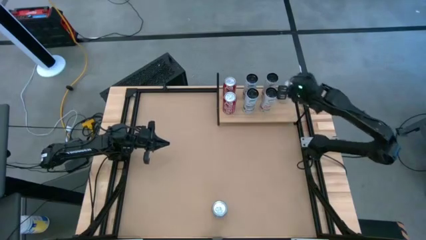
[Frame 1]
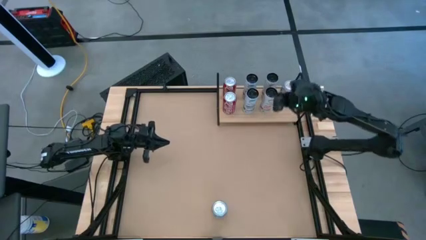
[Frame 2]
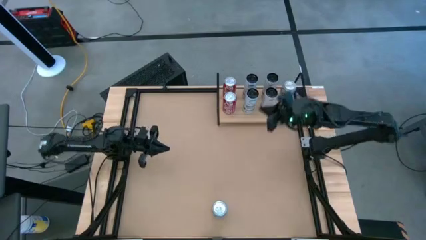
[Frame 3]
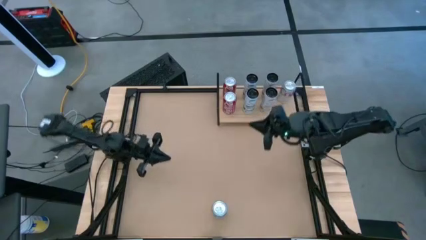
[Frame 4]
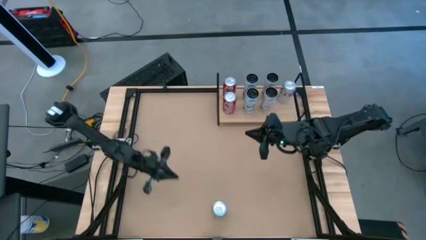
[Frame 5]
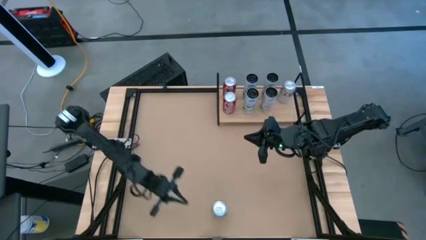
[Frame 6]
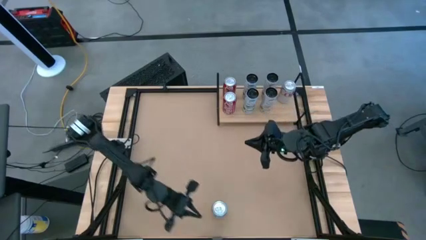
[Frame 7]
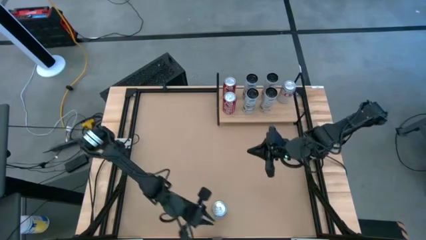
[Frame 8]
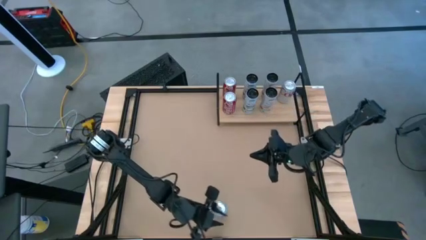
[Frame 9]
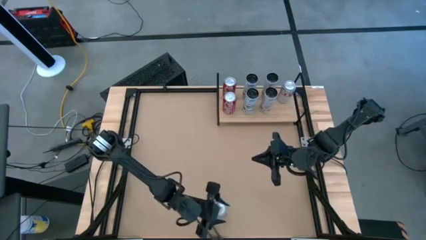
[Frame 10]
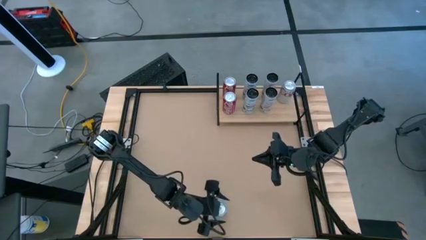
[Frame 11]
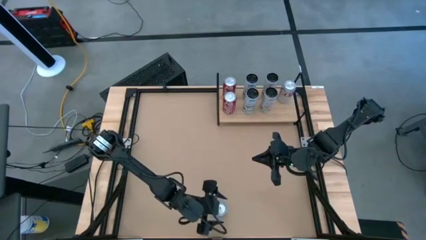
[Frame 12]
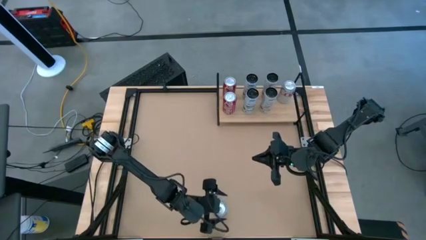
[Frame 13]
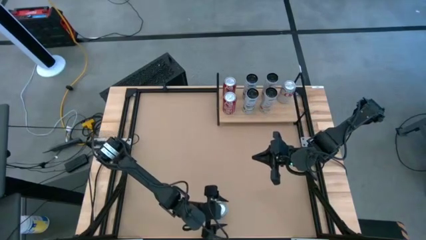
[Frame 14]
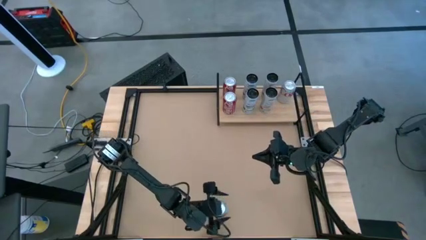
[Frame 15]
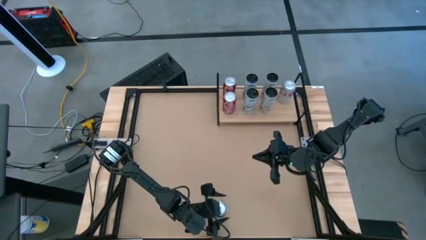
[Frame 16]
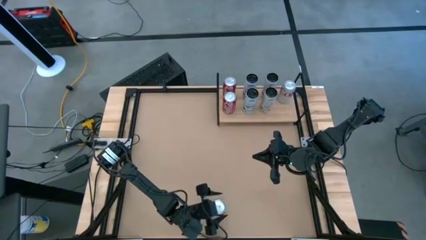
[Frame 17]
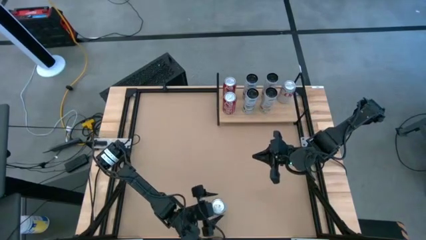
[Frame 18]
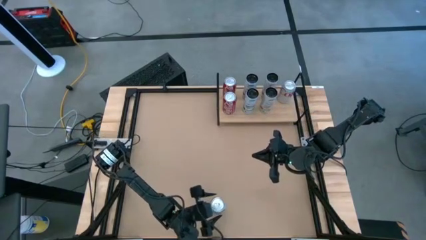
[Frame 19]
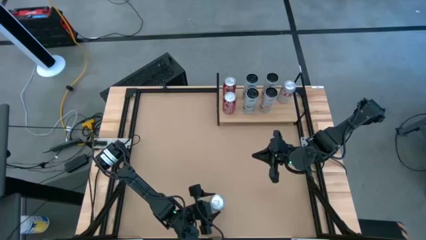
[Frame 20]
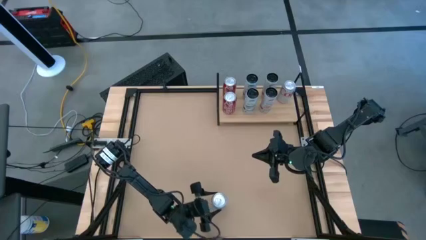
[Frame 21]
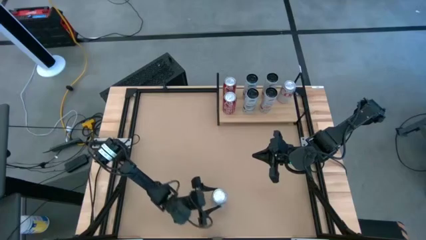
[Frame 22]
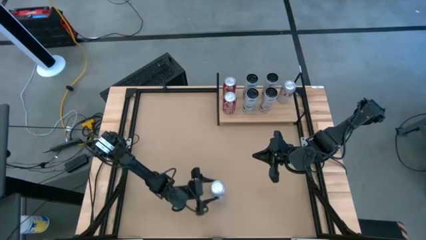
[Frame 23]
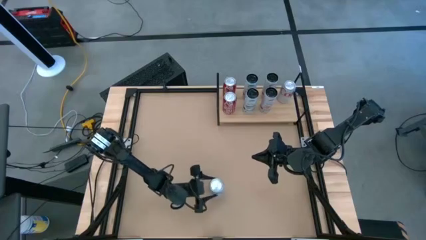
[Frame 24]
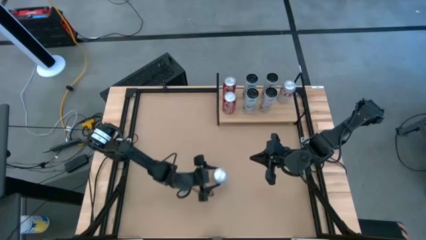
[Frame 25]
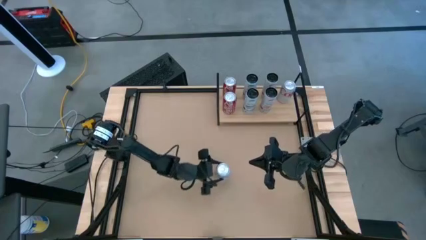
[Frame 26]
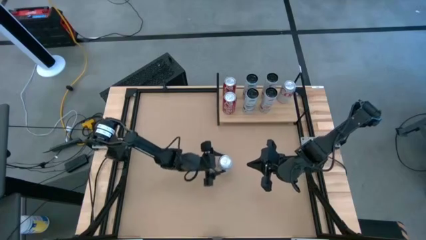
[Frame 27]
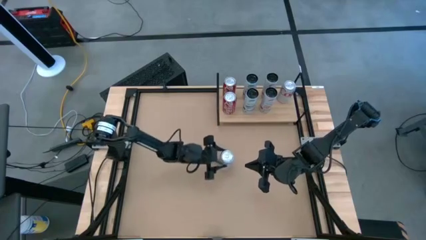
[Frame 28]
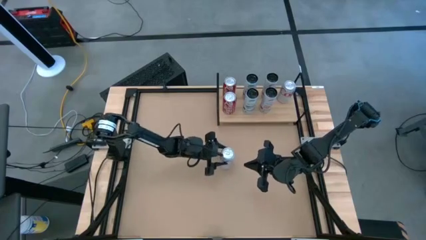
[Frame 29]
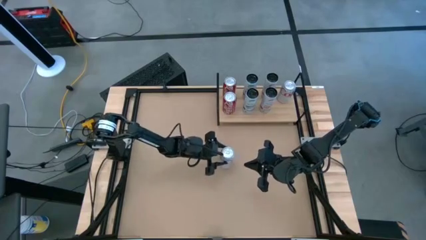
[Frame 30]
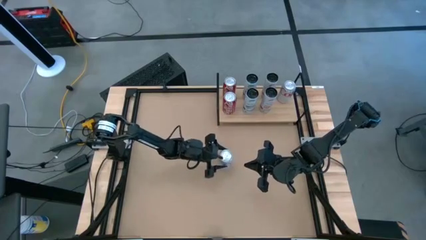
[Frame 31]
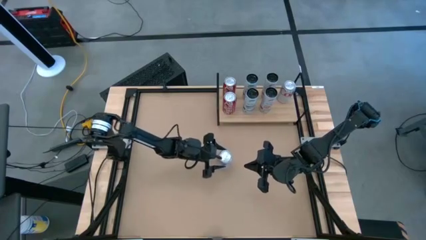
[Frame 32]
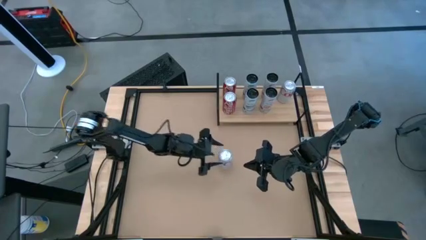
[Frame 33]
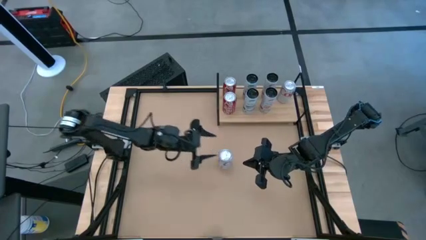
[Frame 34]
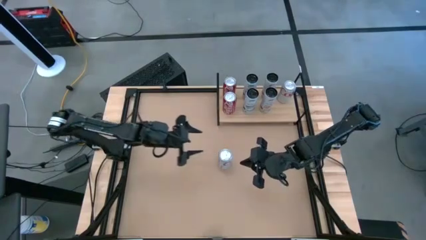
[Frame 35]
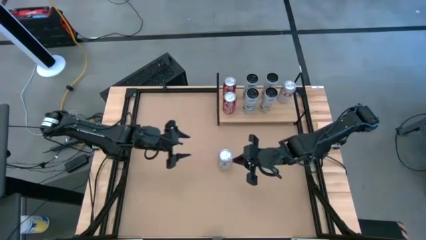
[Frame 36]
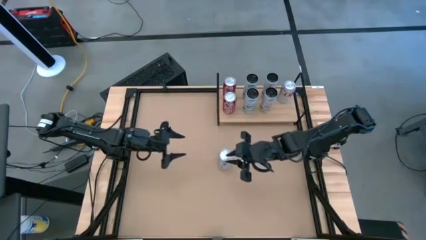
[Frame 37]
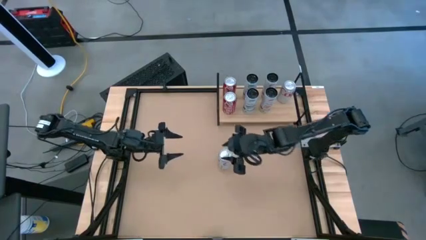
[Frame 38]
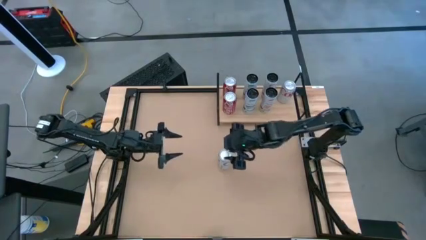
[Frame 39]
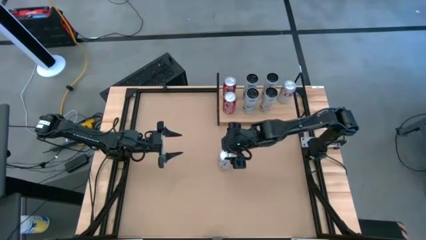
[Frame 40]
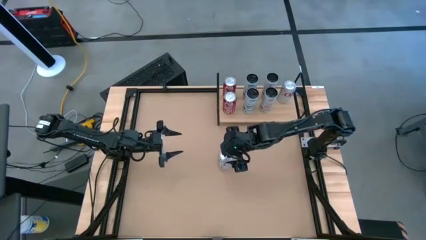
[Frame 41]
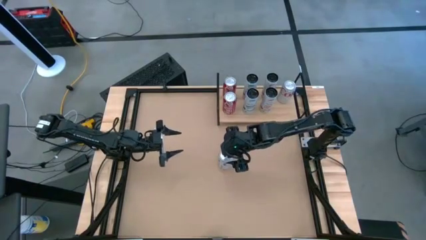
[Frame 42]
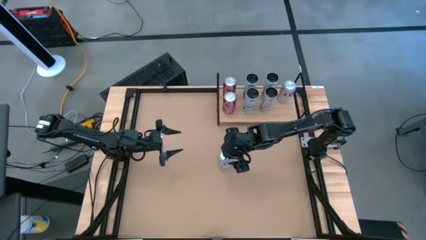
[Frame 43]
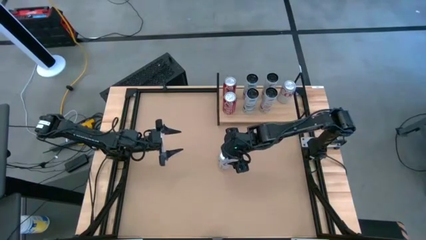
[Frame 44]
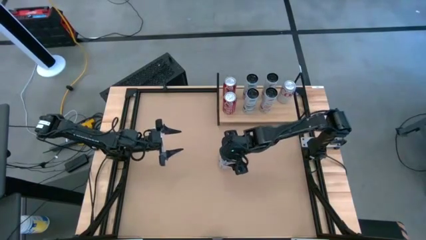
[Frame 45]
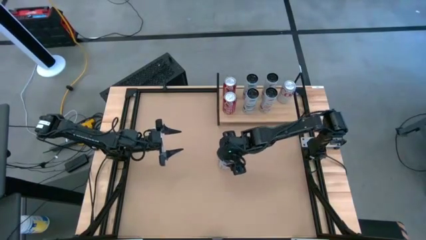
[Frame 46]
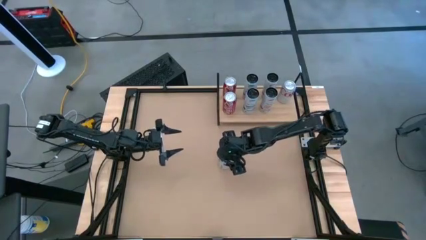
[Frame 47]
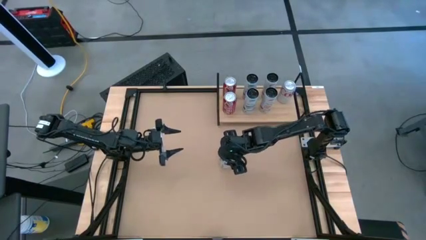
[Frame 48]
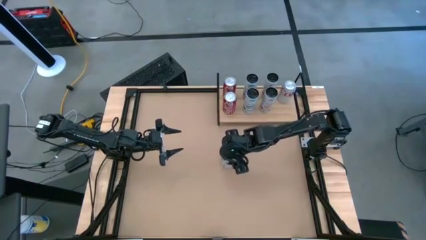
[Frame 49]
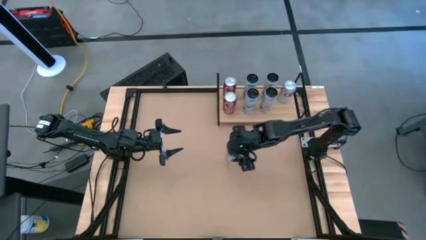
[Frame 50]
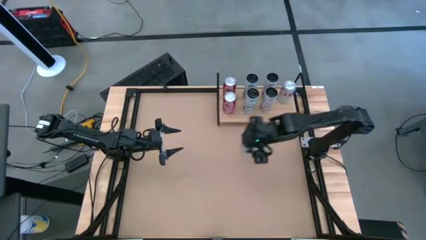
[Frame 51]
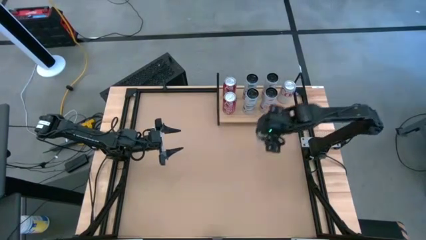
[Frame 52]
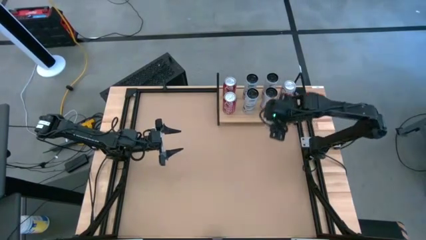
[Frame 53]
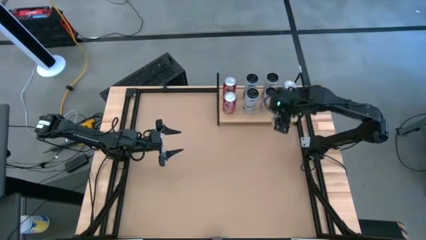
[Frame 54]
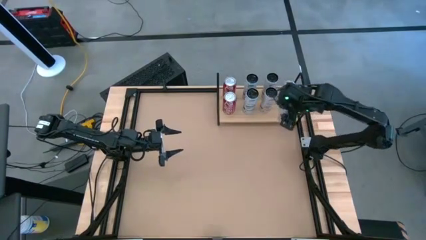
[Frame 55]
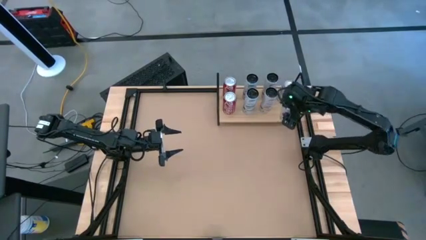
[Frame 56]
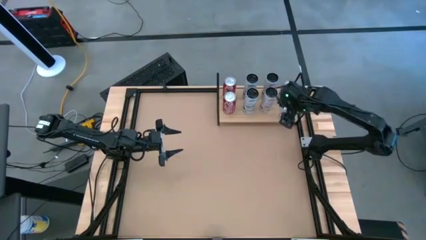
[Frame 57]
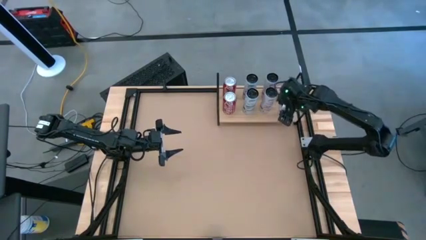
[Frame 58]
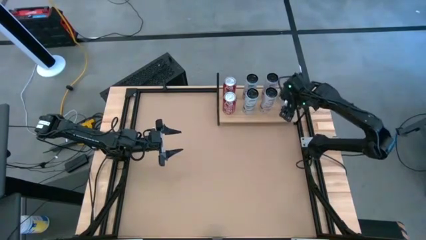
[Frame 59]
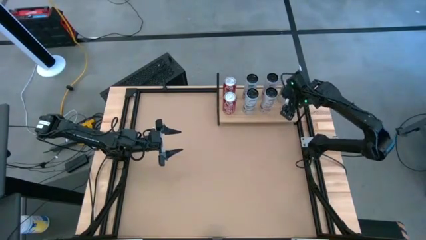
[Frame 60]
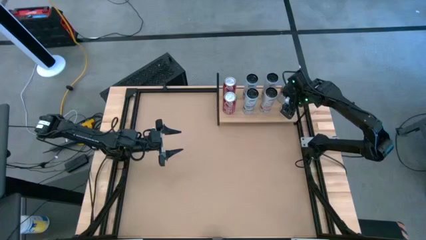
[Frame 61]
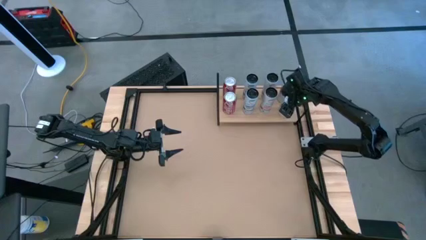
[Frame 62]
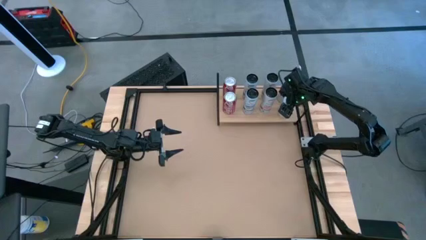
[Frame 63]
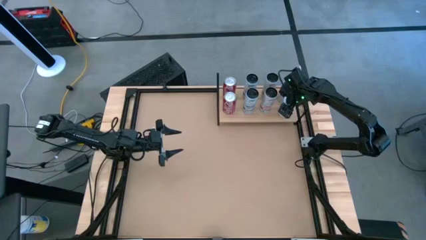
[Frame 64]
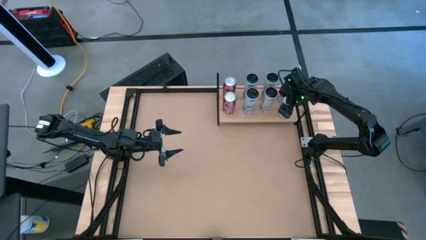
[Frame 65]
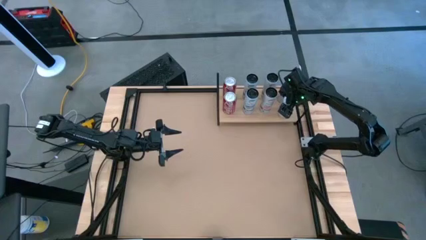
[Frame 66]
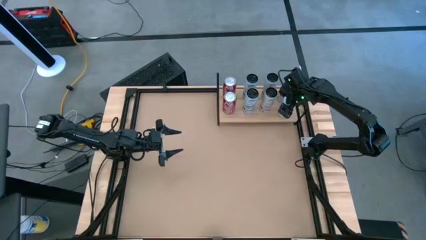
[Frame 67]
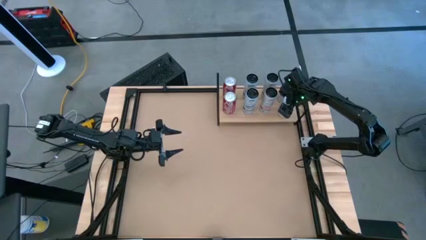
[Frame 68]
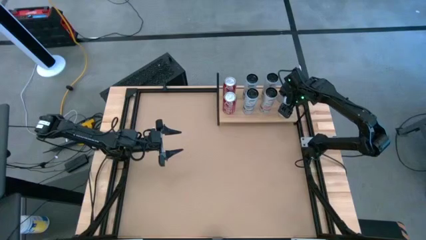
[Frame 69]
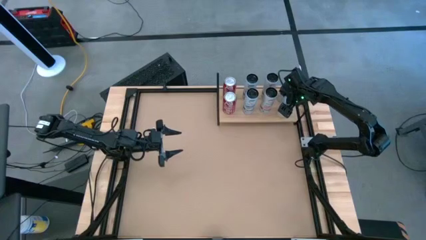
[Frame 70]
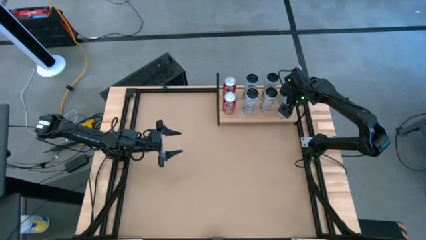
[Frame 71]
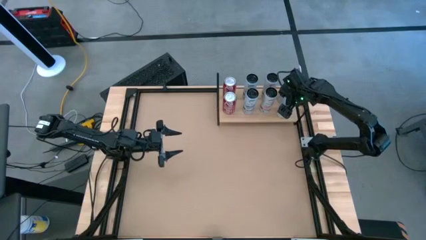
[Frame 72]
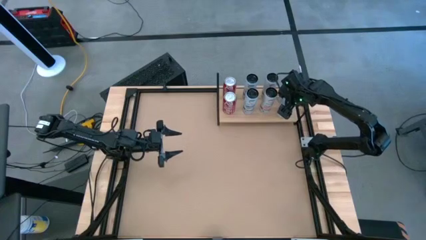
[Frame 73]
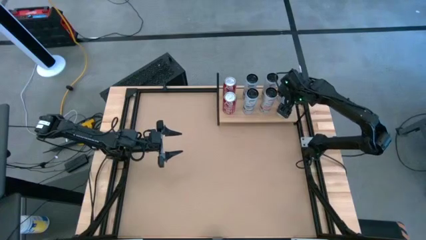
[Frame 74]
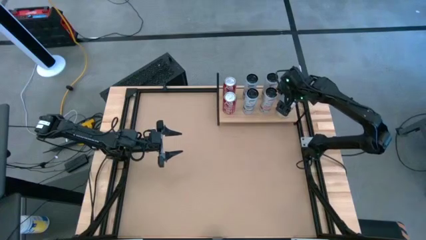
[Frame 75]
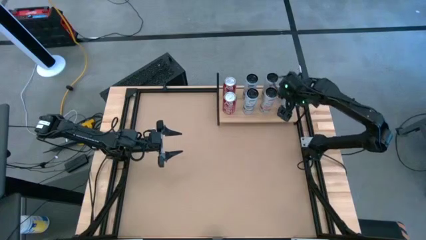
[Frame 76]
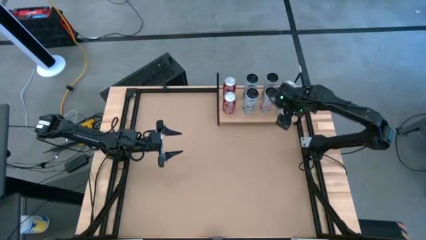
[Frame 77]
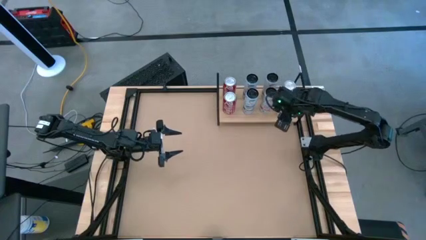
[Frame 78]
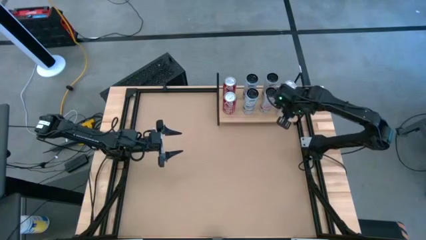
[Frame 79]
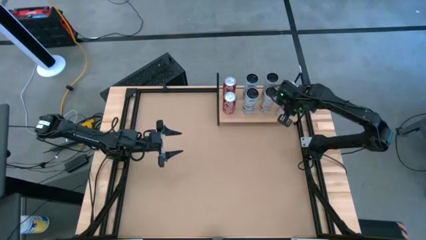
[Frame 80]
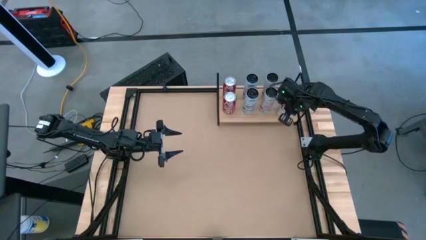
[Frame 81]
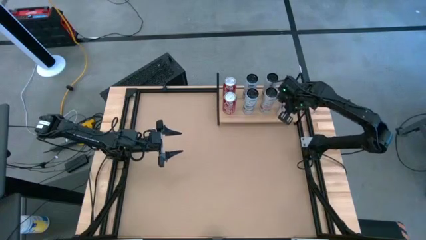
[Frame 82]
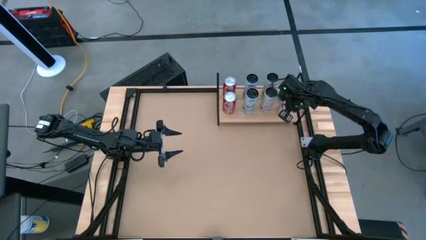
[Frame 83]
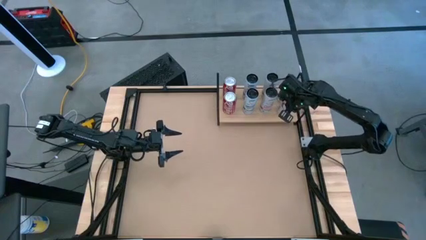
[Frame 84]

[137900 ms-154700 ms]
Task: Place canned beverage on shelf
Put the white soda can on the shelf
